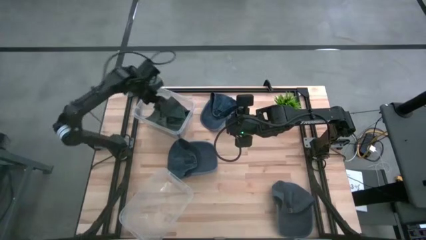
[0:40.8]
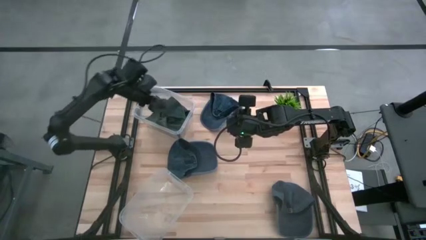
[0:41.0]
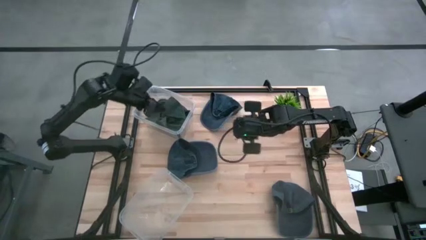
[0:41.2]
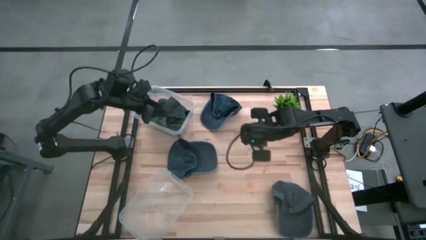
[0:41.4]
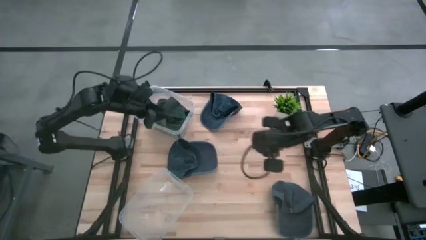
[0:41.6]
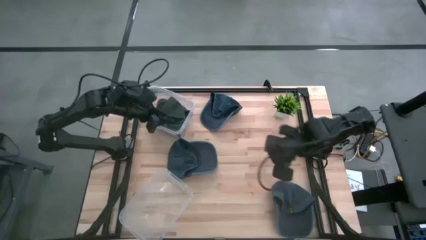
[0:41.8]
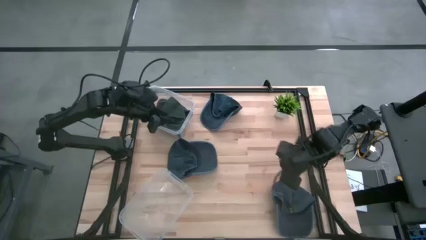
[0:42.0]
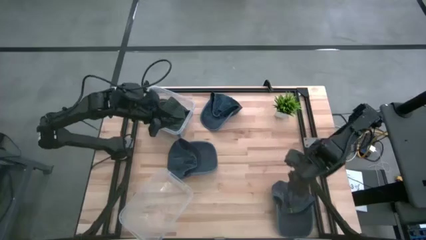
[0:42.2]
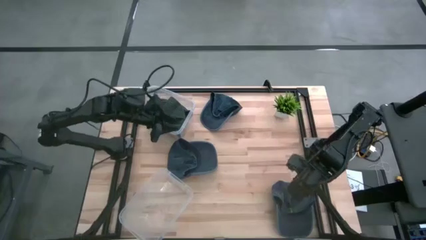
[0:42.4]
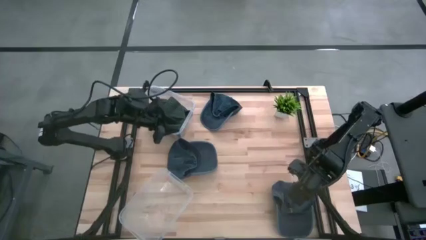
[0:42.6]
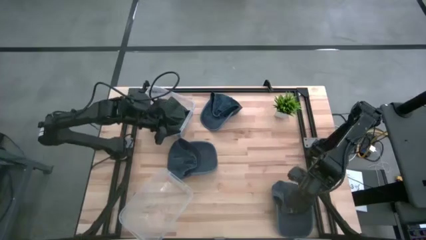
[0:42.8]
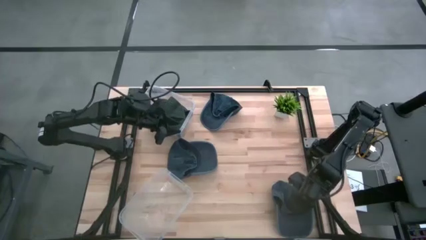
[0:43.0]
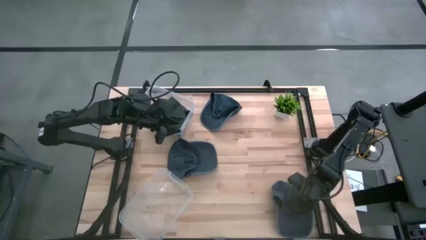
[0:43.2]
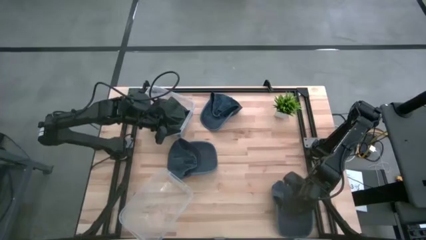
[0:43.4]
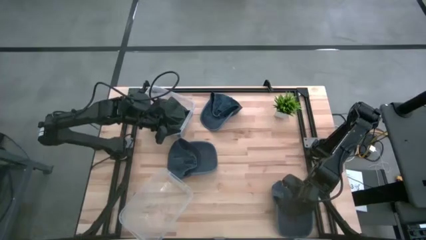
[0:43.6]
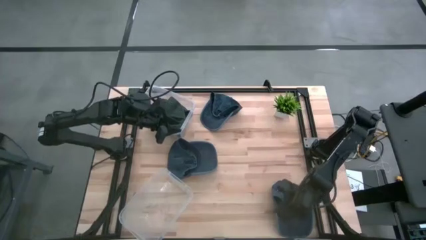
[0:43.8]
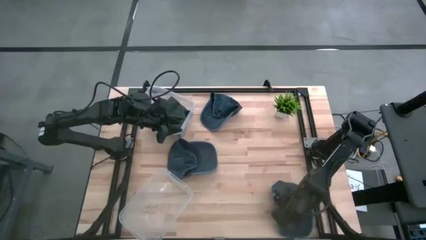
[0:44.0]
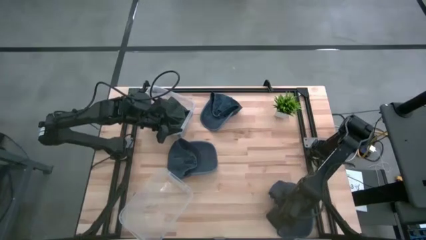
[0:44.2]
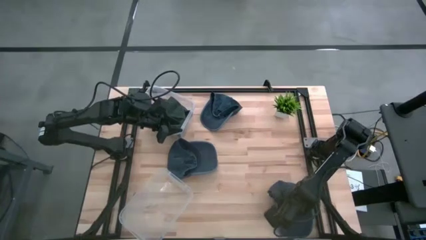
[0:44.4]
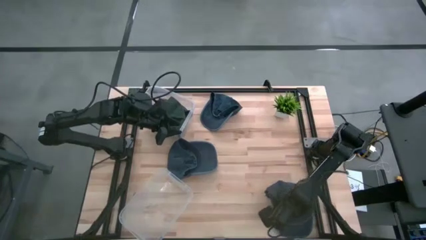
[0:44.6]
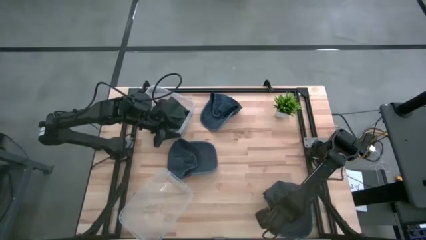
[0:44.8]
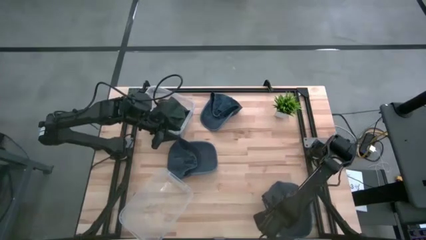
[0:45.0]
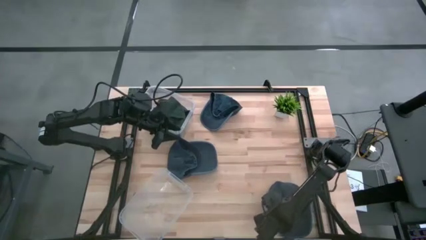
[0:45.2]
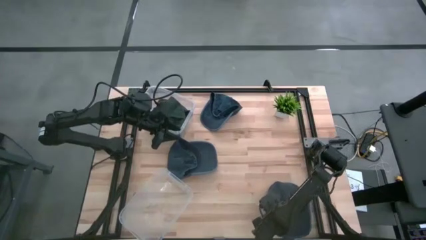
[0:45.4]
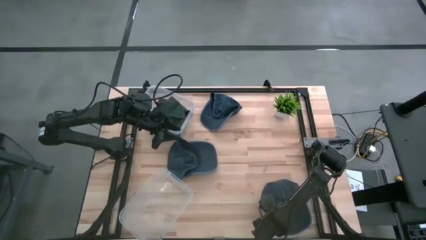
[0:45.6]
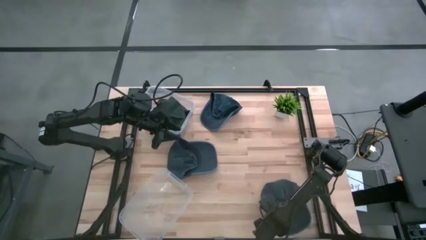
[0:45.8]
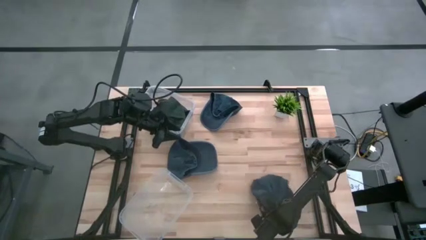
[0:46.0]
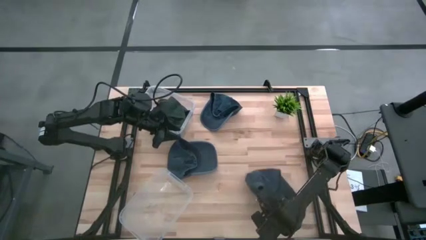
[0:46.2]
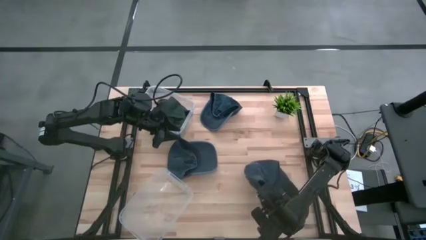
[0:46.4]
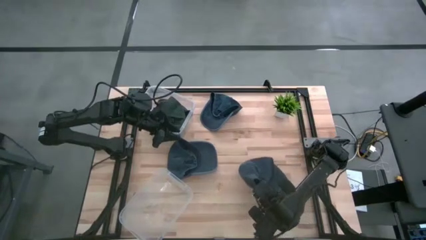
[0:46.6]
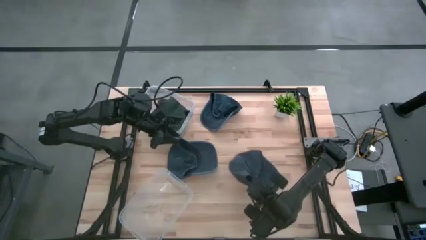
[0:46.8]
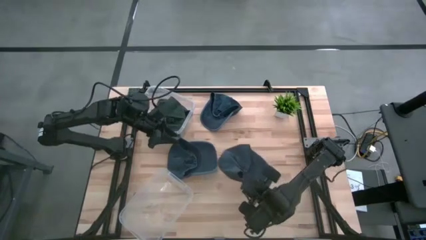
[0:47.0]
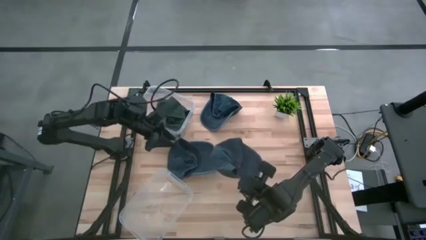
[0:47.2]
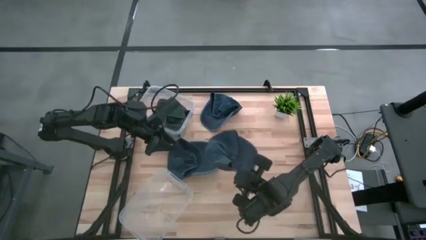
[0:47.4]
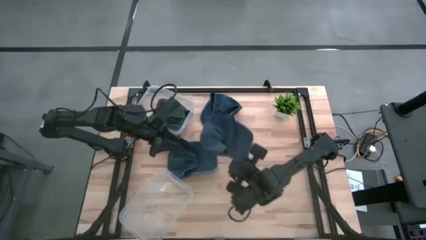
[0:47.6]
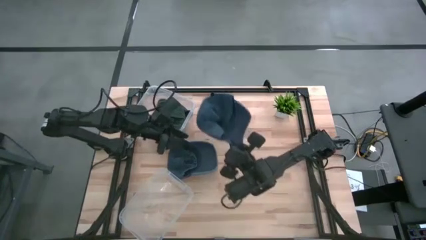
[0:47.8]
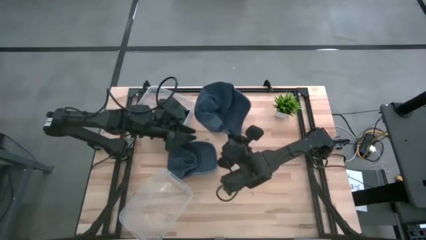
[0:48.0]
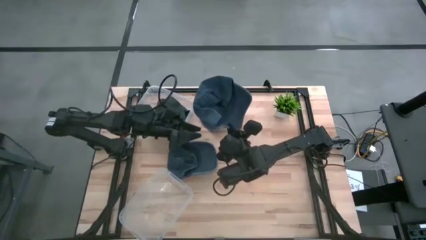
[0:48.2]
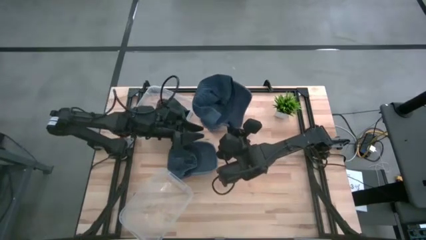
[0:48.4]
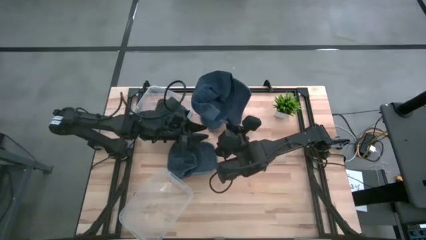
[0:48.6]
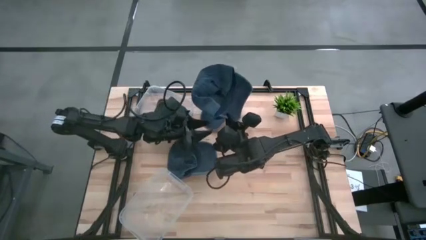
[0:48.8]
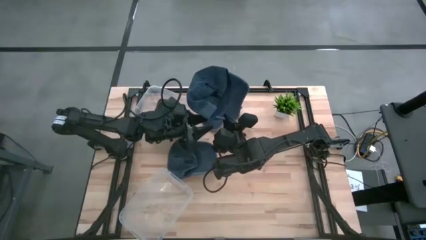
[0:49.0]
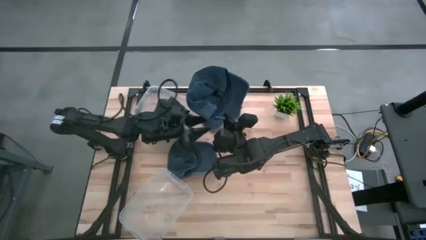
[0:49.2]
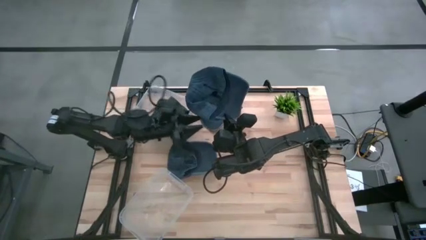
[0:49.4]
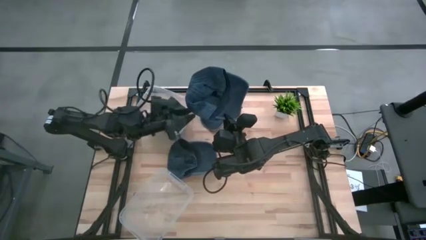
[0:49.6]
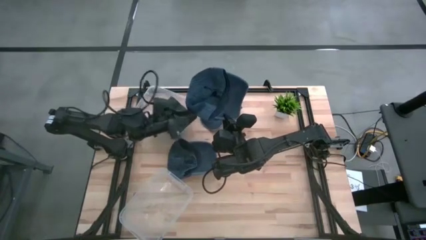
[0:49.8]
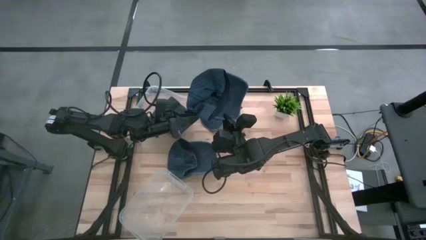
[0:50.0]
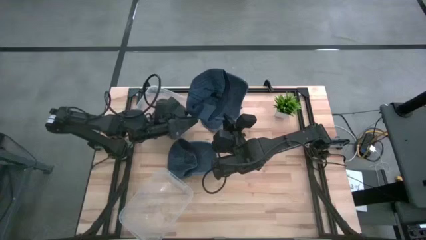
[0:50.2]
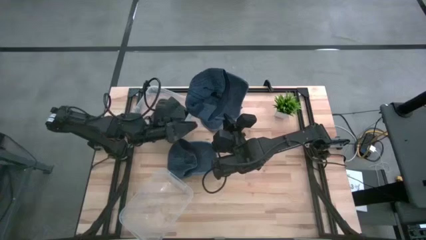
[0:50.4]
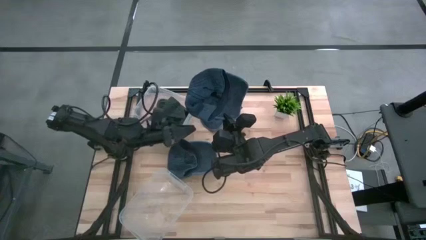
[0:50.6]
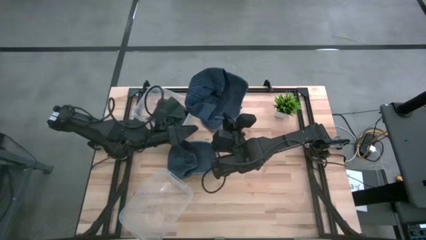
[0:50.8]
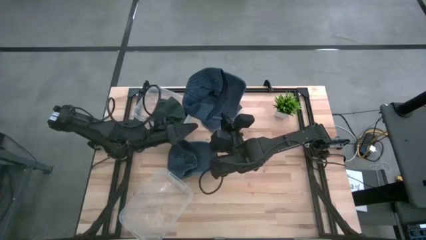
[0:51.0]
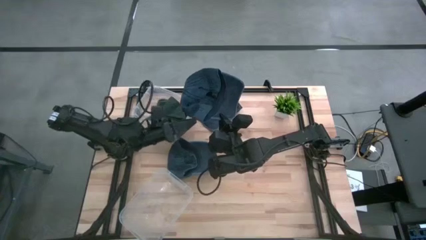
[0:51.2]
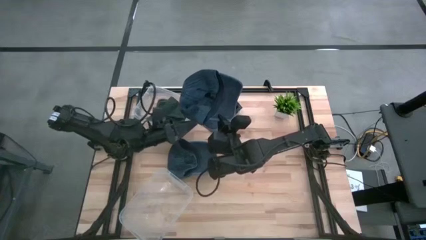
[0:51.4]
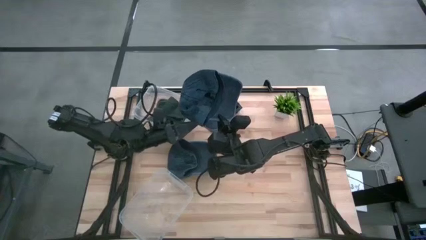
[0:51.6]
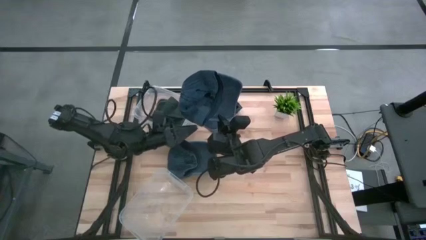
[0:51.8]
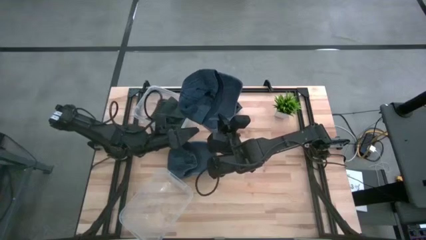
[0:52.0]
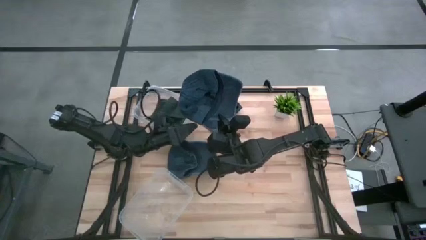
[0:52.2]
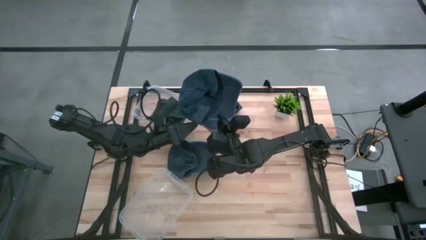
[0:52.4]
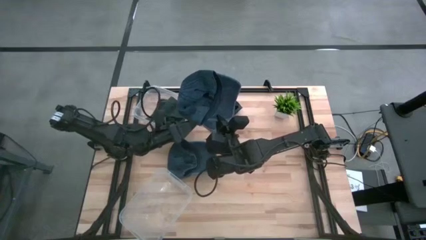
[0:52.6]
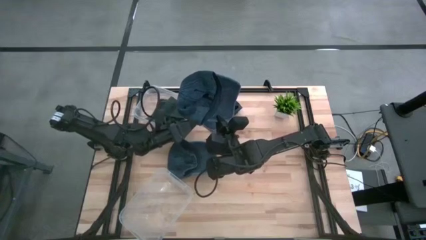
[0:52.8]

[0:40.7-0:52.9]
Task: Pick & Place hat
Put the bottom right dark blue cap into the bottom transparent bin
